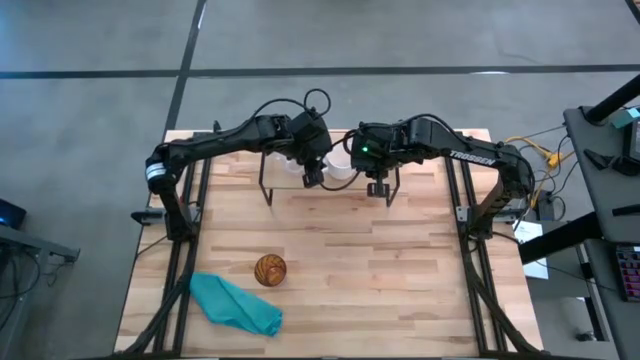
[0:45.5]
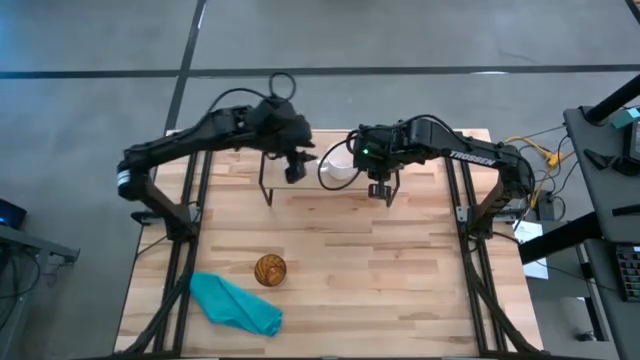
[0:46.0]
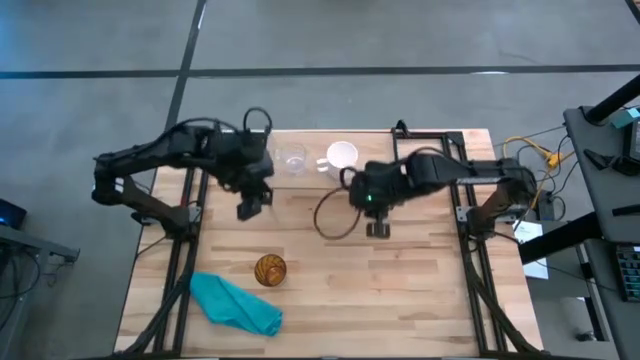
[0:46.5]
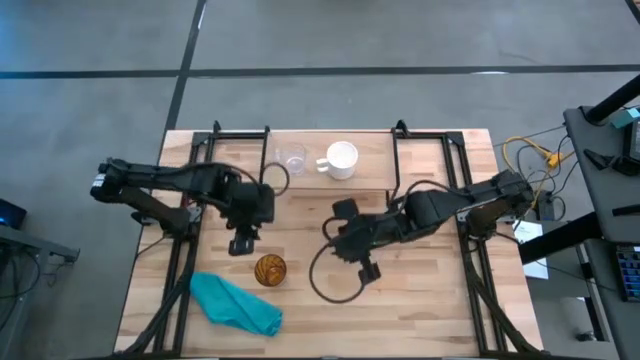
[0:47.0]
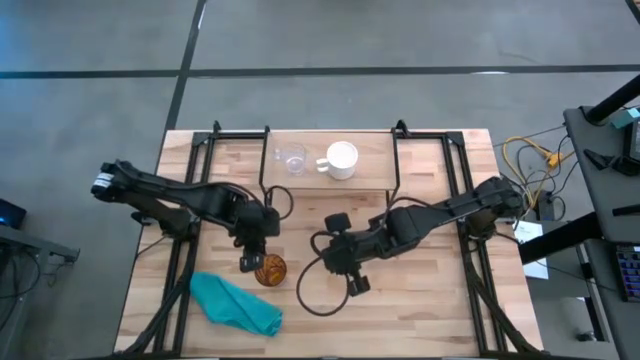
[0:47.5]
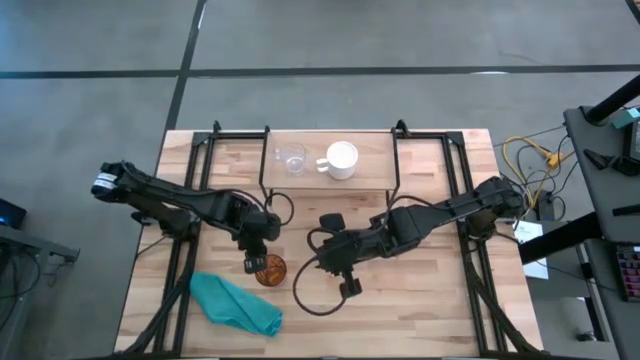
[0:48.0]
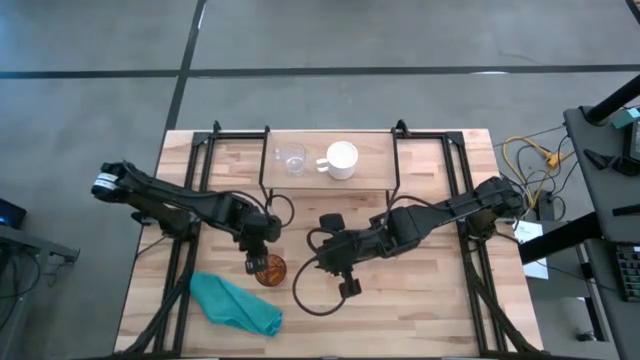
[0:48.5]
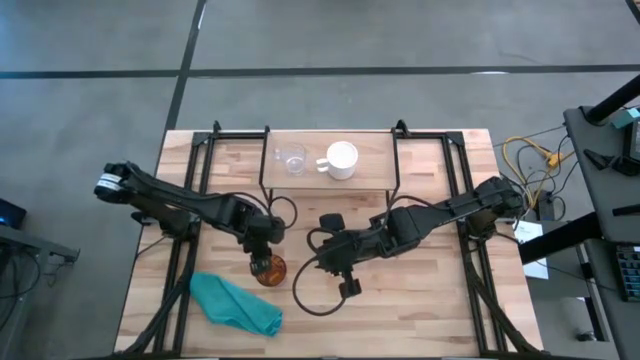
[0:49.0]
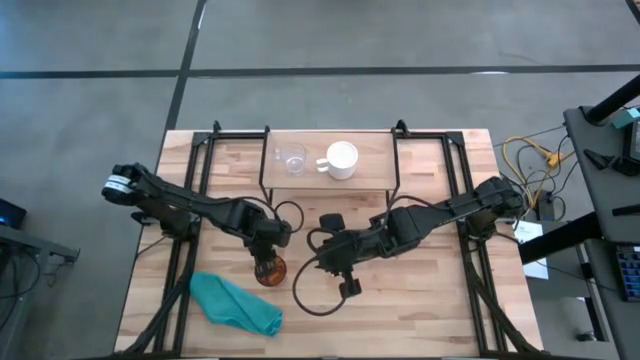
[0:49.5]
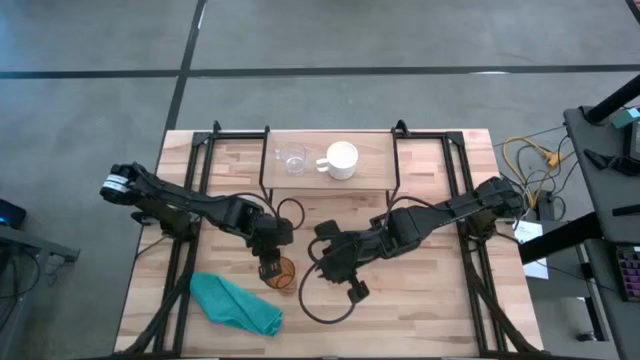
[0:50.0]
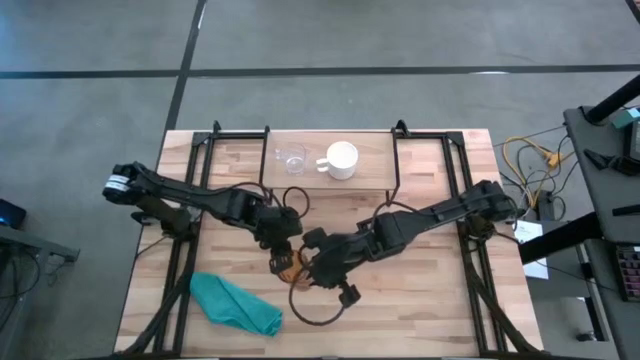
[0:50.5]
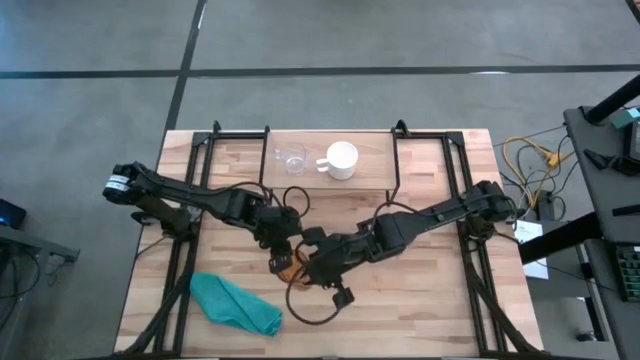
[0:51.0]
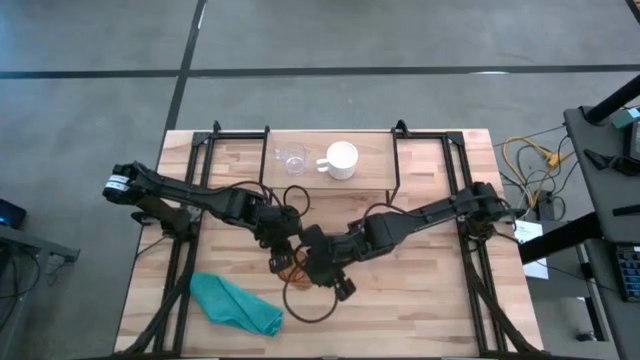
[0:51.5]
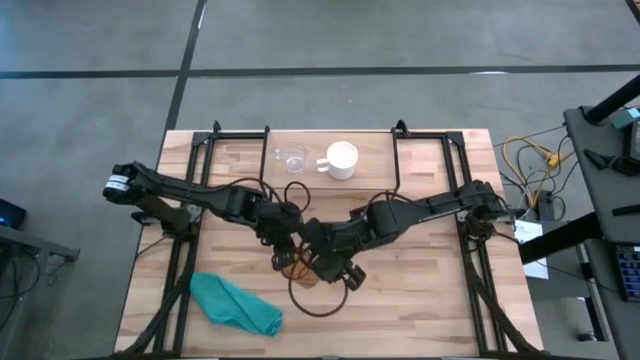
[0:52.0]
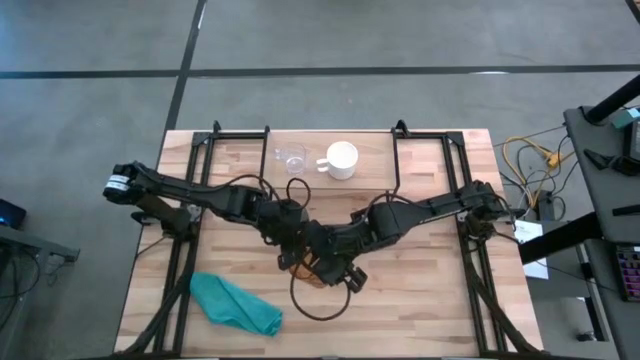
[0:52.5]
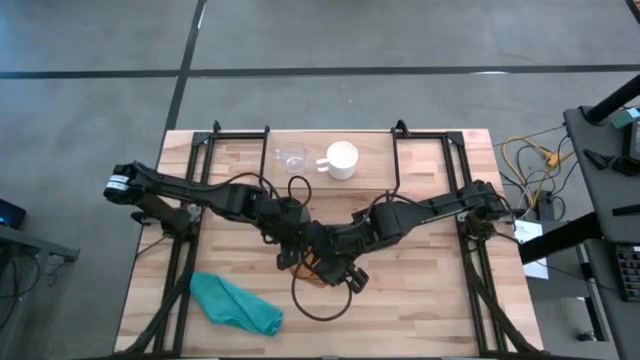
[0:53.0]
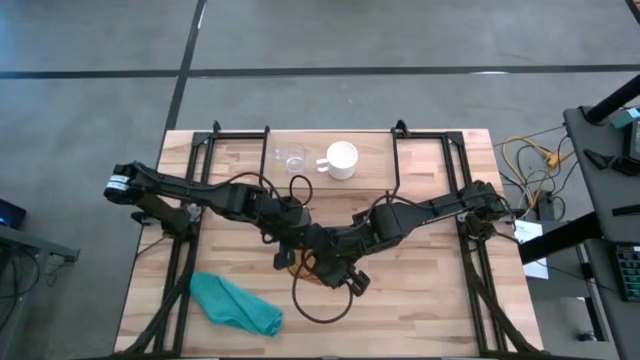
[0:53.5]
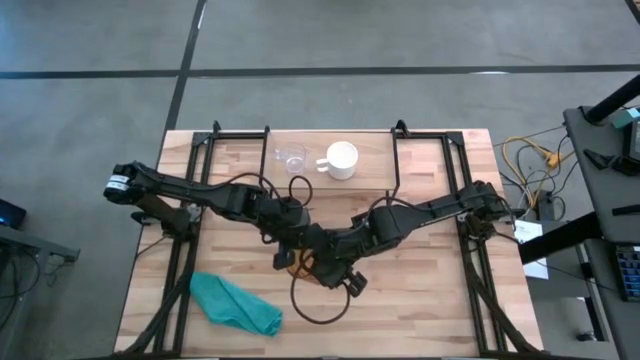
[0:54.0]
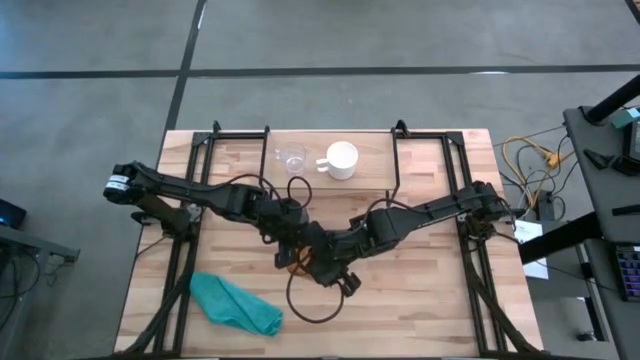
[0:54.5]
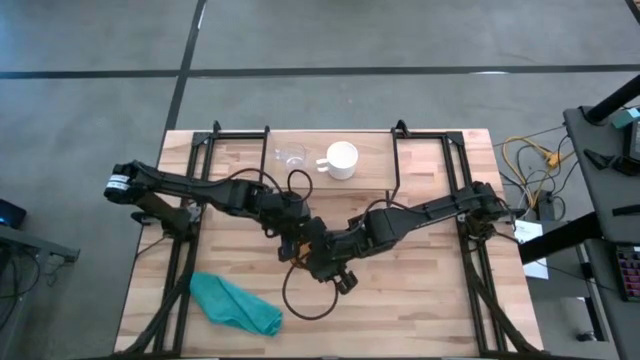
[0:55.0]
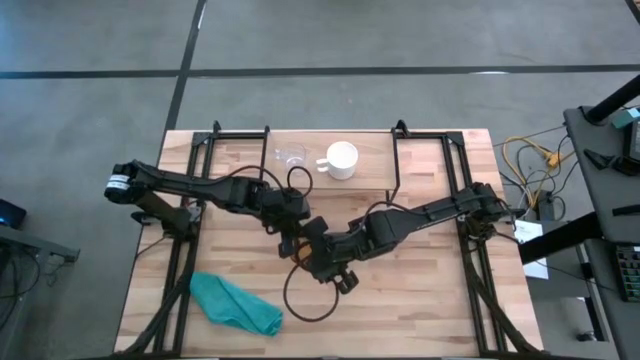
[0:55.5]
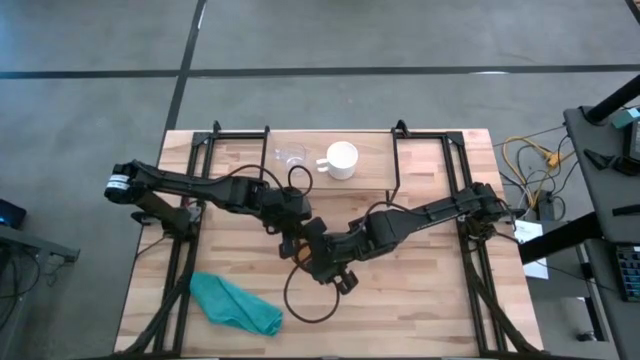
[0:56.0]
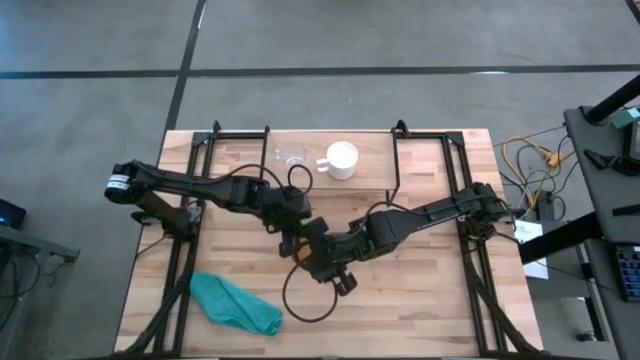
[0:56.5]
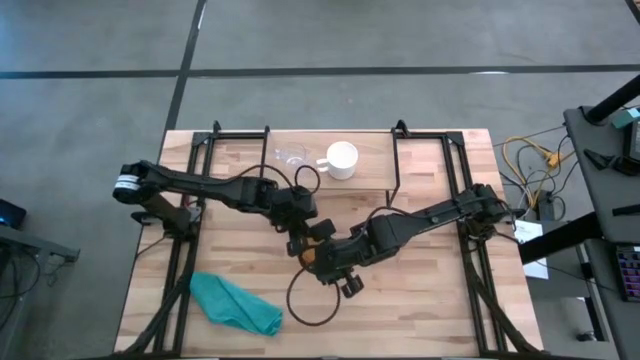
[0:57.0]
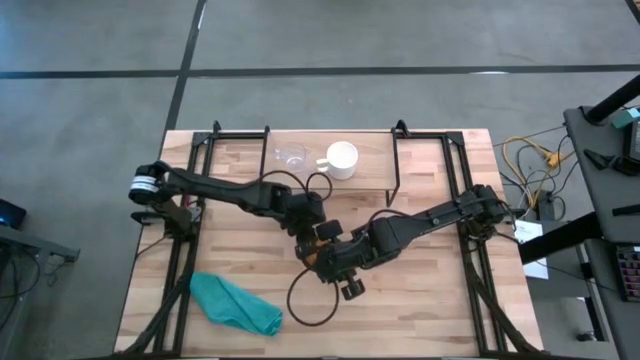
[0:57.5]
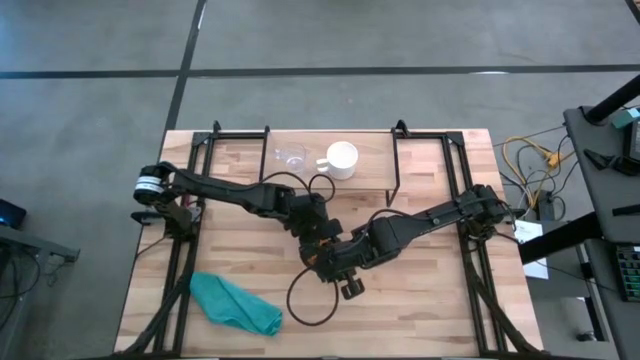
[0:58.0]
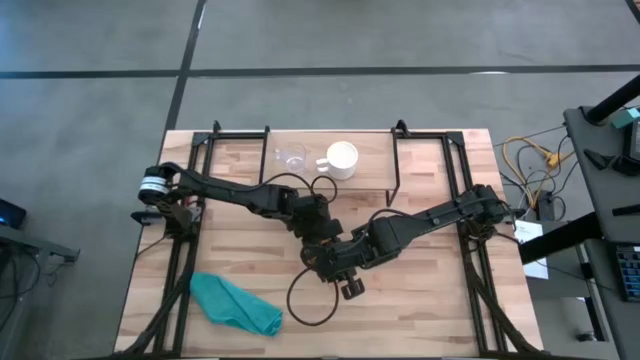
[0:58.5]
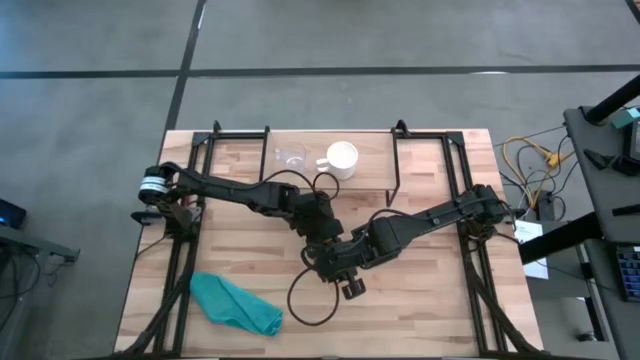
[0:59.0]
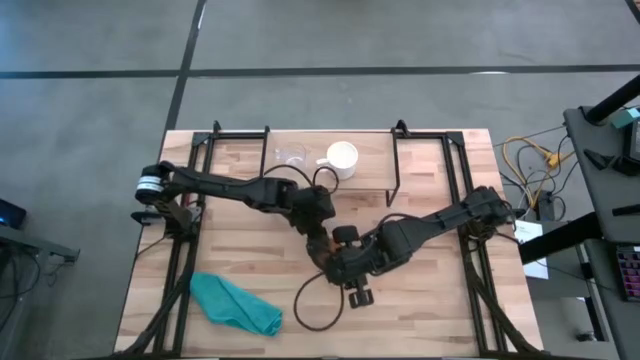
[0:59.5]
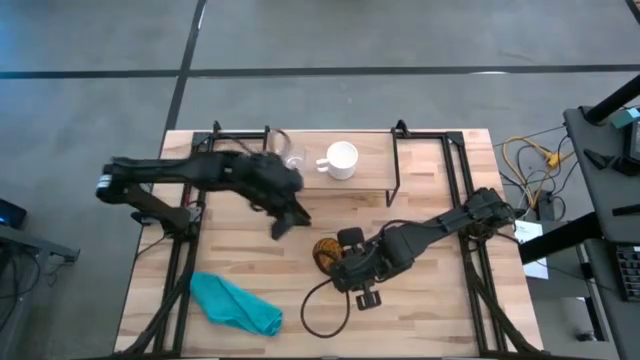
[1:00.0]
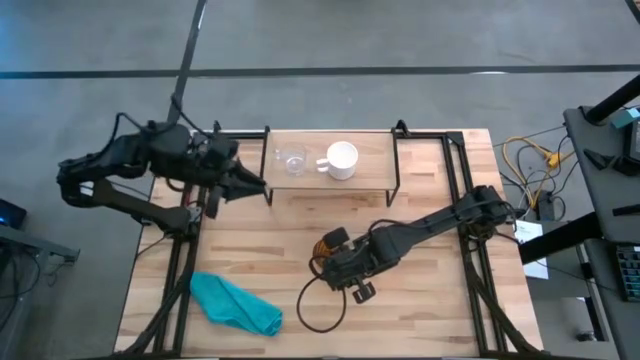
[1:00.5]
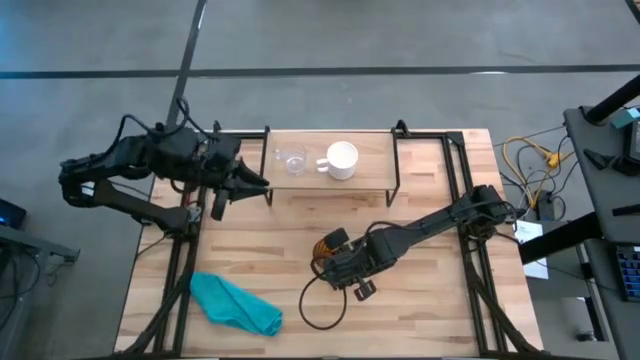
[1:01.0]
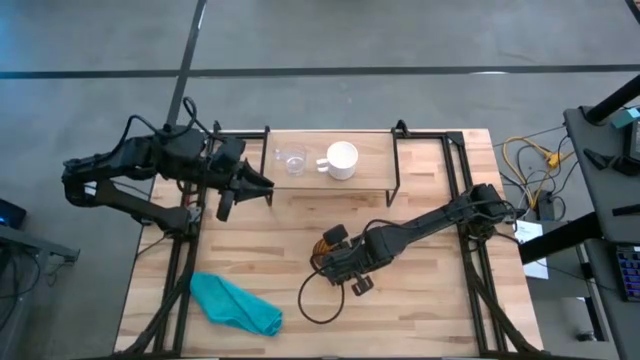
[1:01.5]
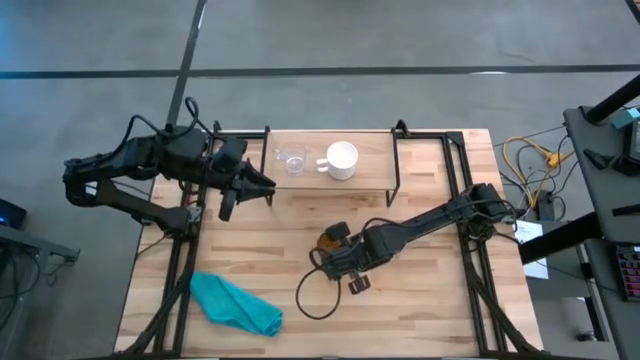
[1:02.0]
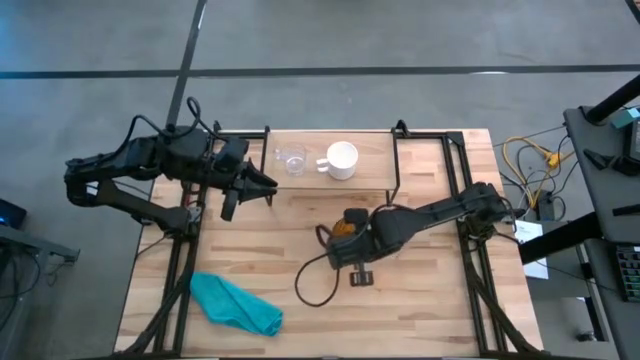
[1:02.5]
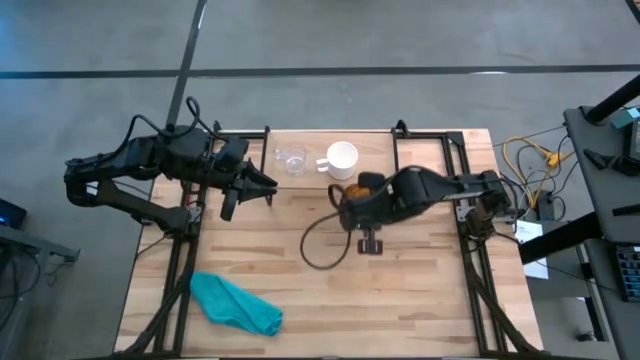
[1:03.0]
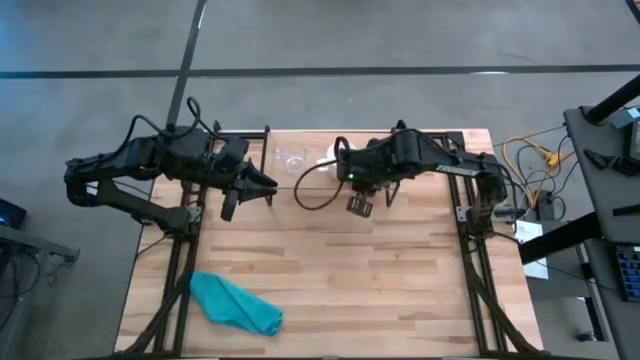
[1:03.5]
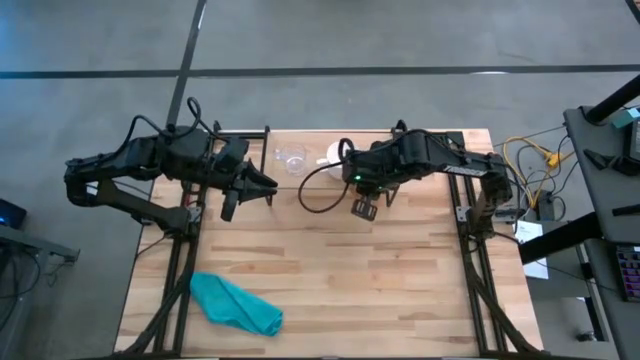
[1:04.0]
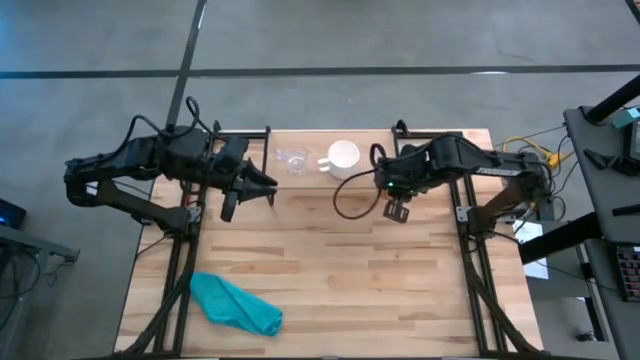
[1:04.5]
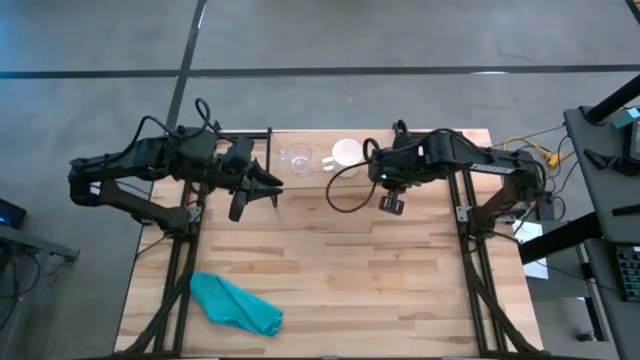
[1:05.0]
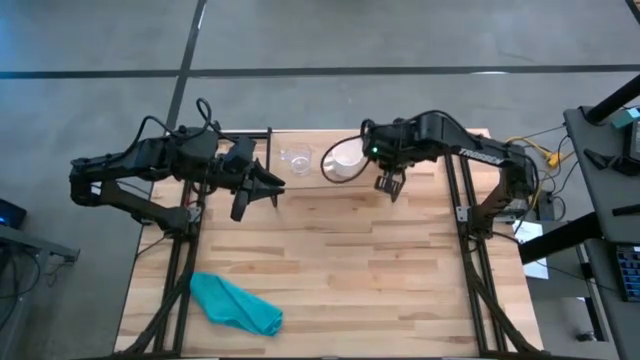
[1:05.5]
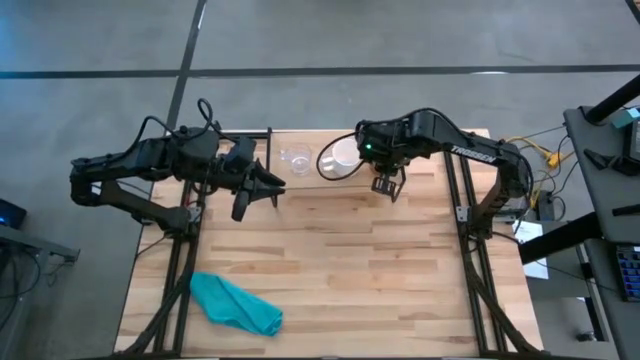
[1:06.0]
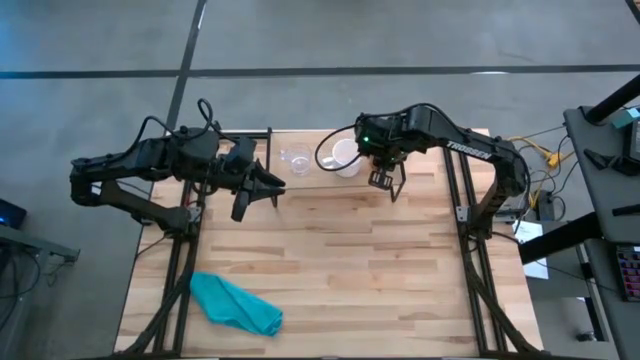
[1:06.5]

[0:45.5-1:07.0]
Task: Stack small to large cups/mugs on shelf
Put the brown glass on the shelf
